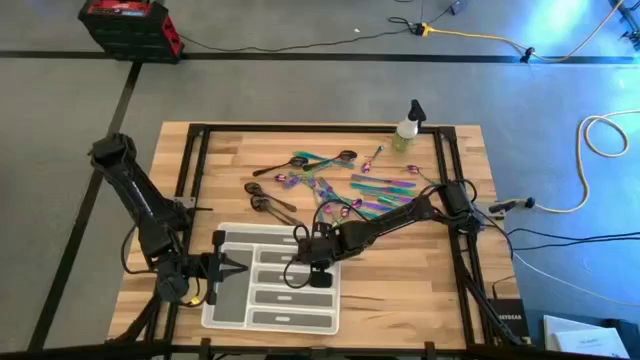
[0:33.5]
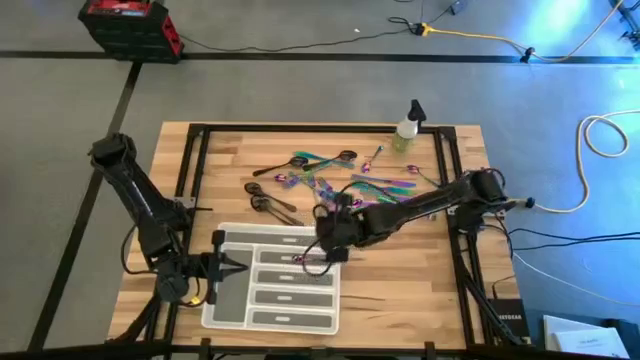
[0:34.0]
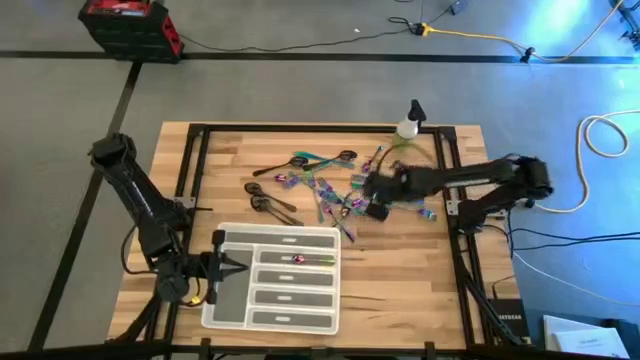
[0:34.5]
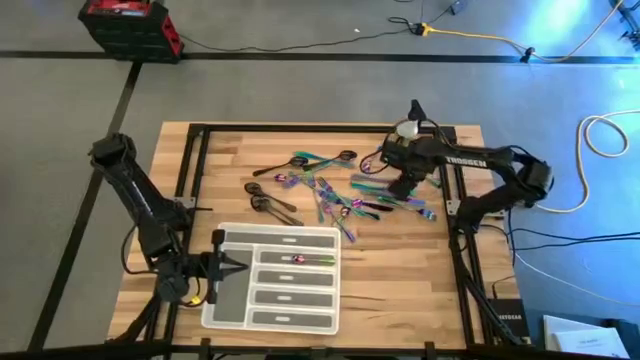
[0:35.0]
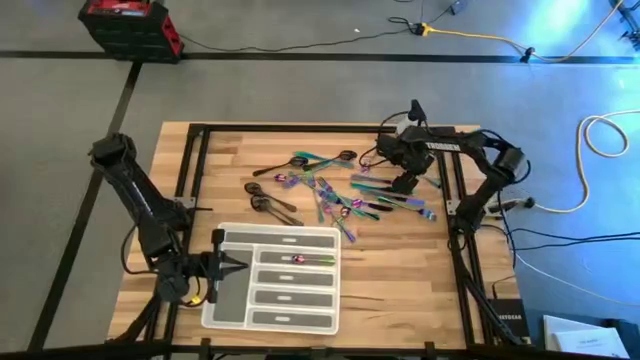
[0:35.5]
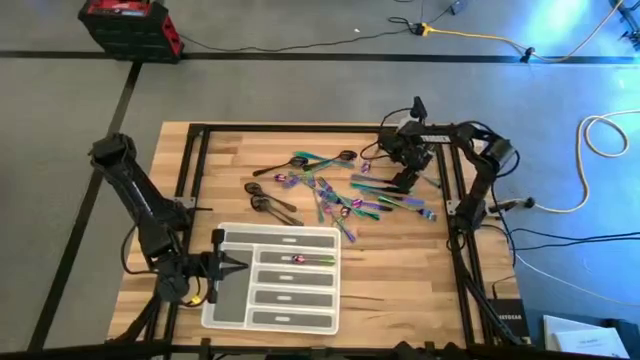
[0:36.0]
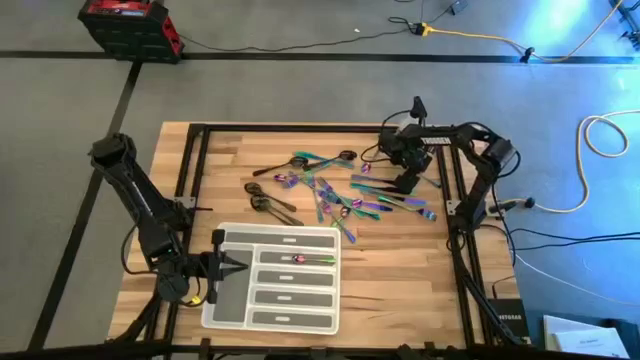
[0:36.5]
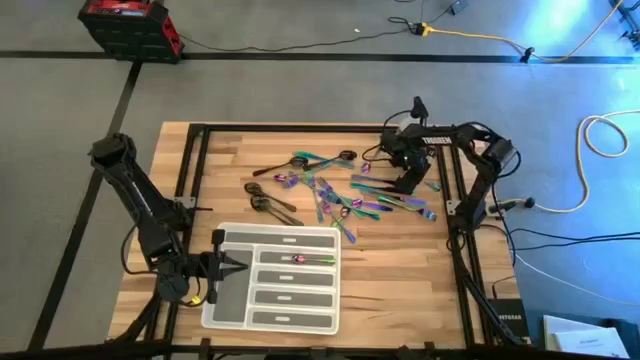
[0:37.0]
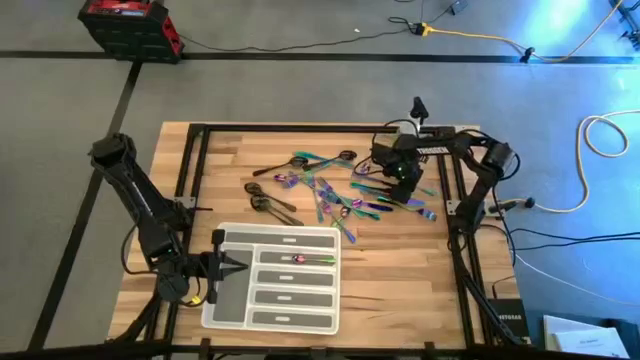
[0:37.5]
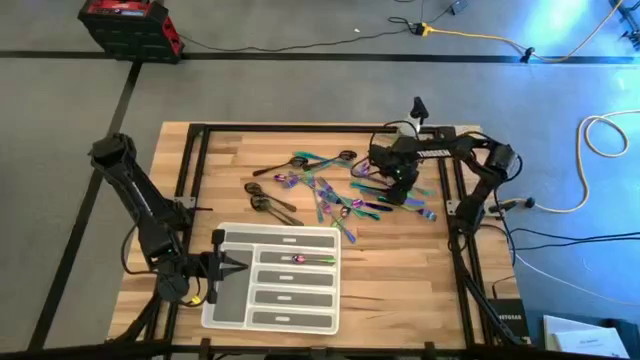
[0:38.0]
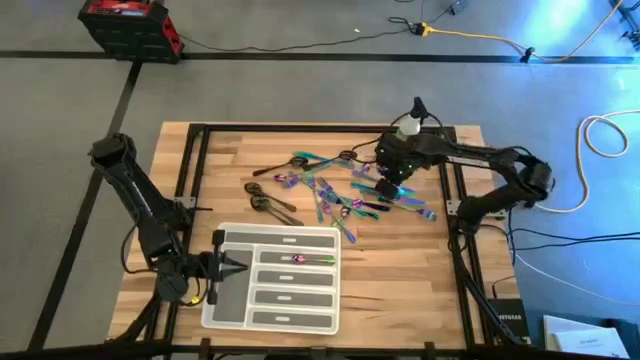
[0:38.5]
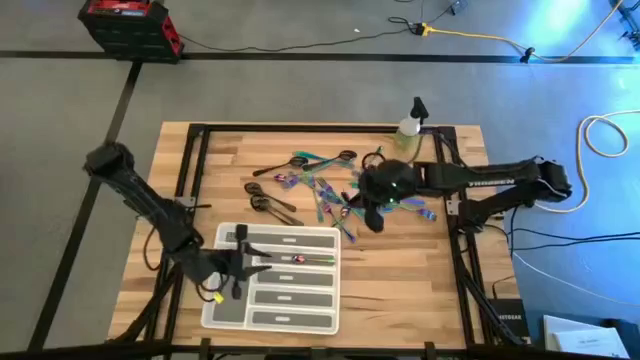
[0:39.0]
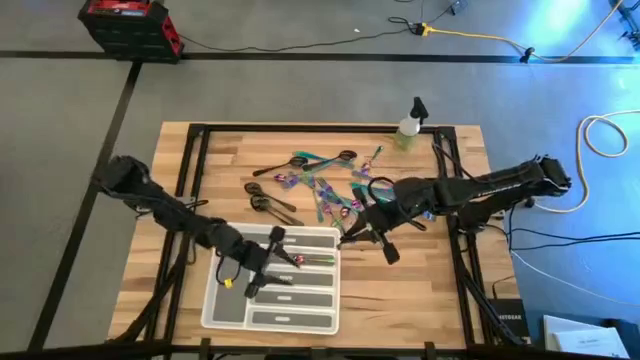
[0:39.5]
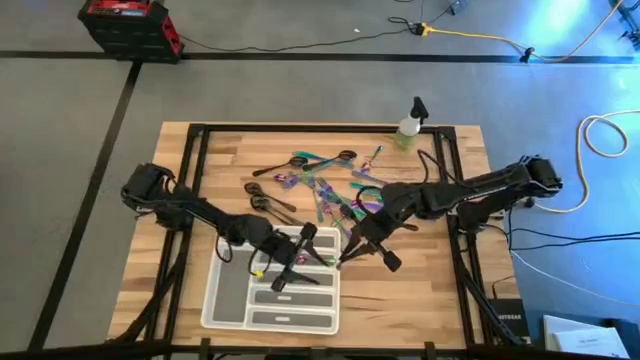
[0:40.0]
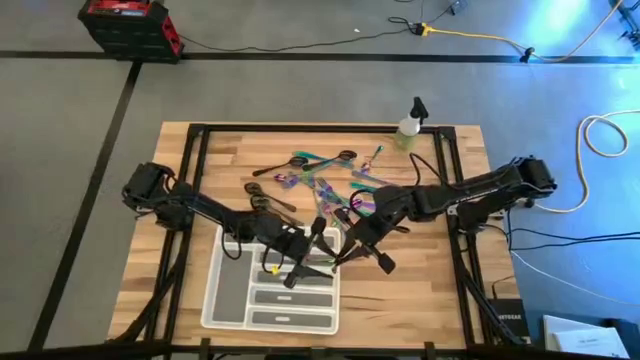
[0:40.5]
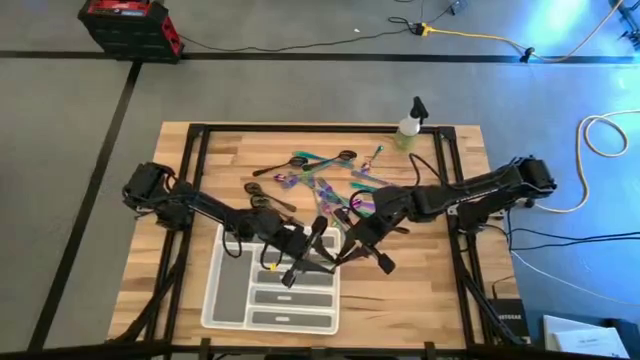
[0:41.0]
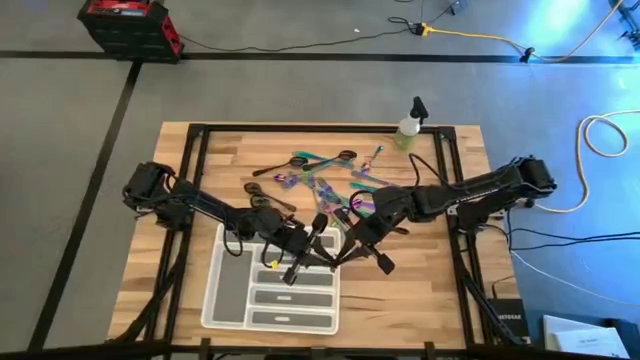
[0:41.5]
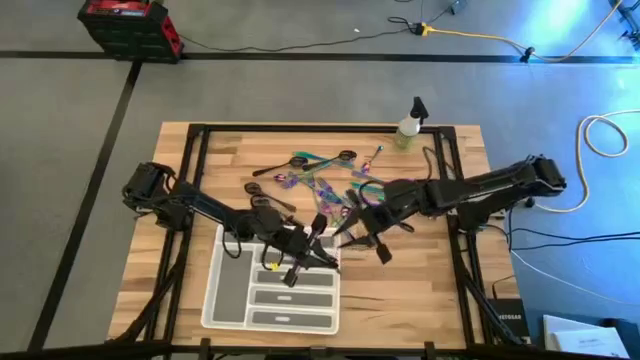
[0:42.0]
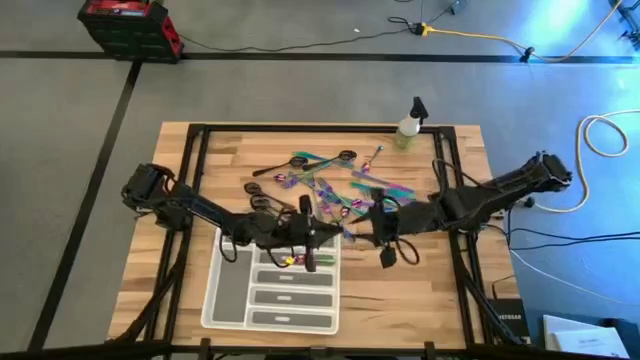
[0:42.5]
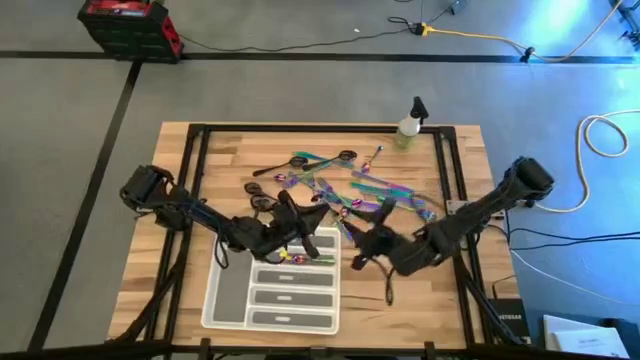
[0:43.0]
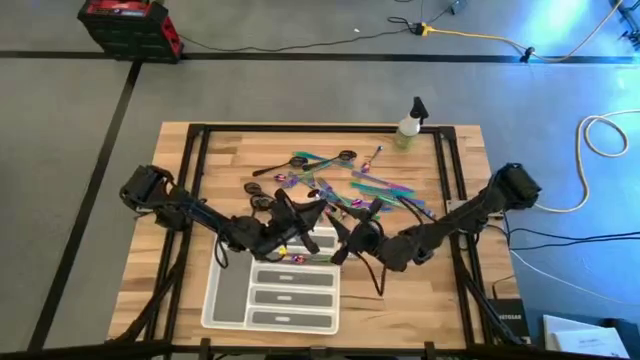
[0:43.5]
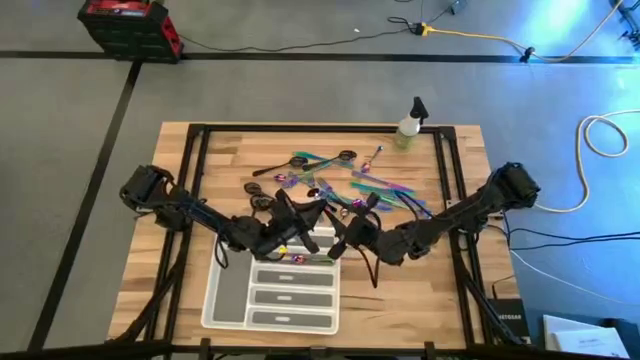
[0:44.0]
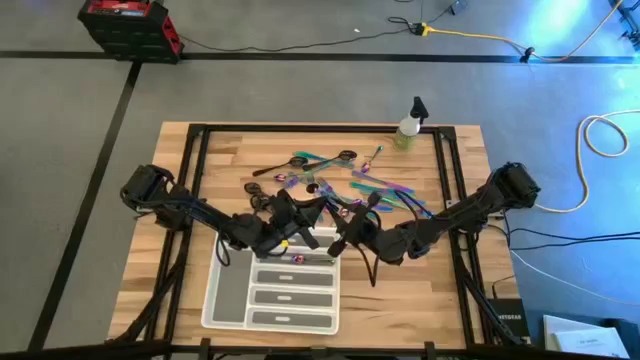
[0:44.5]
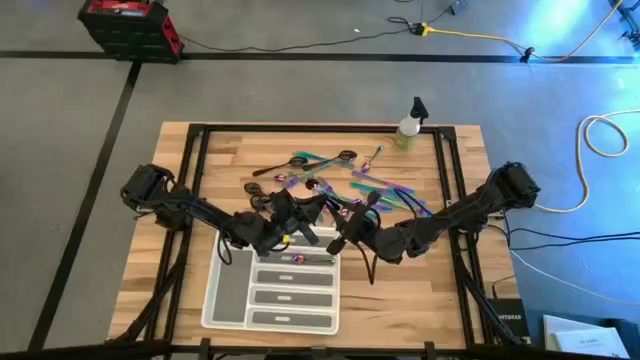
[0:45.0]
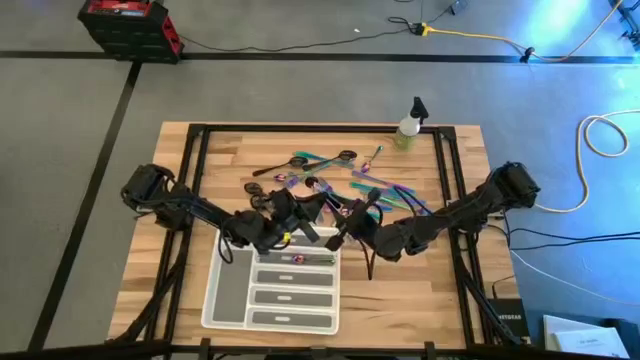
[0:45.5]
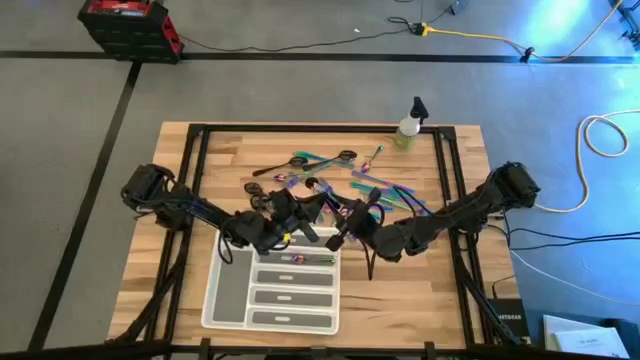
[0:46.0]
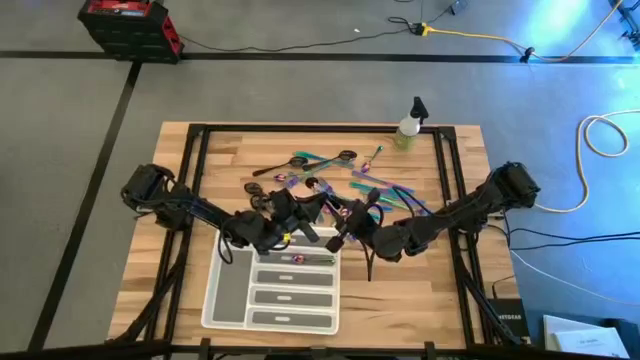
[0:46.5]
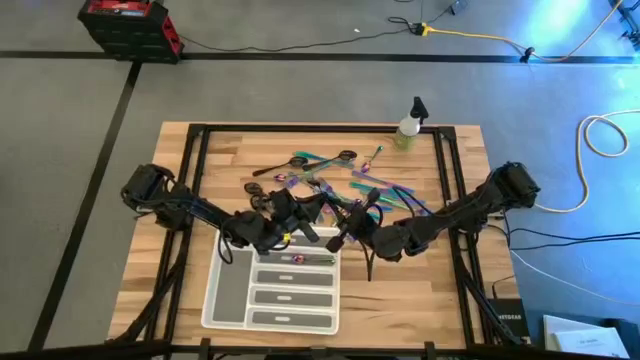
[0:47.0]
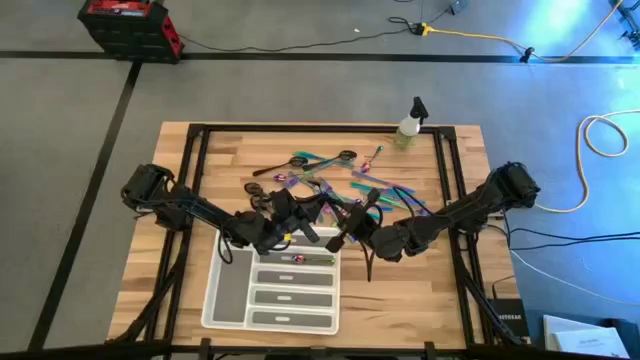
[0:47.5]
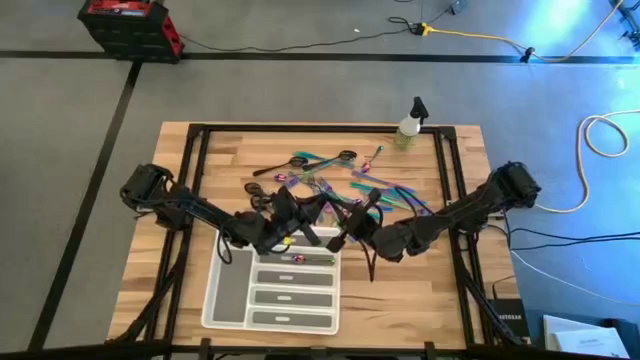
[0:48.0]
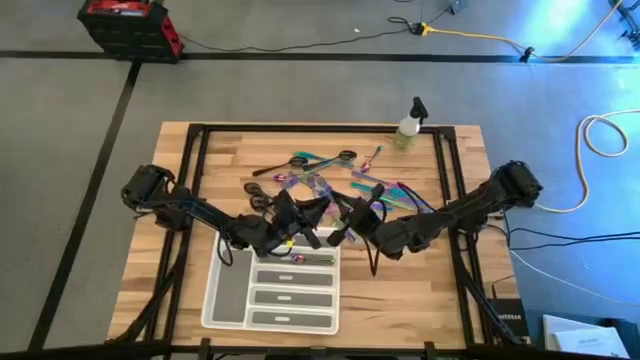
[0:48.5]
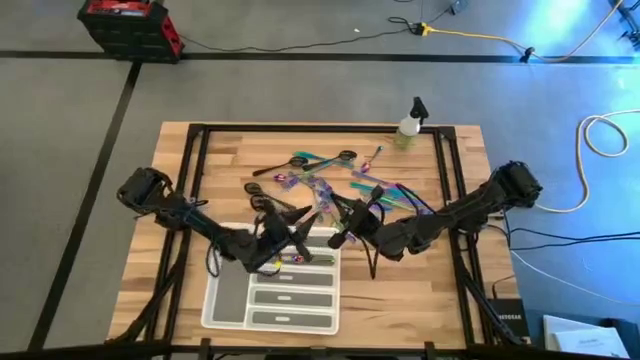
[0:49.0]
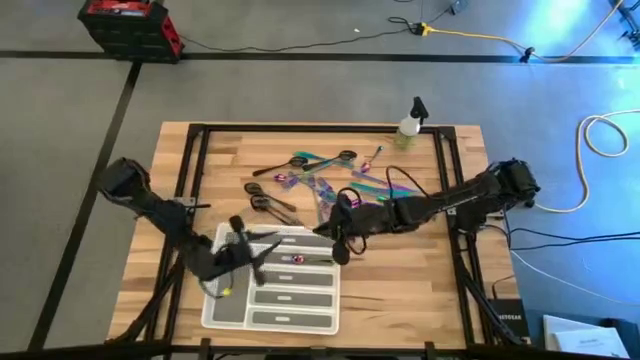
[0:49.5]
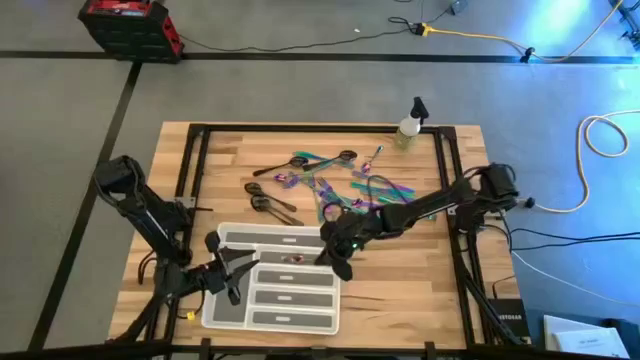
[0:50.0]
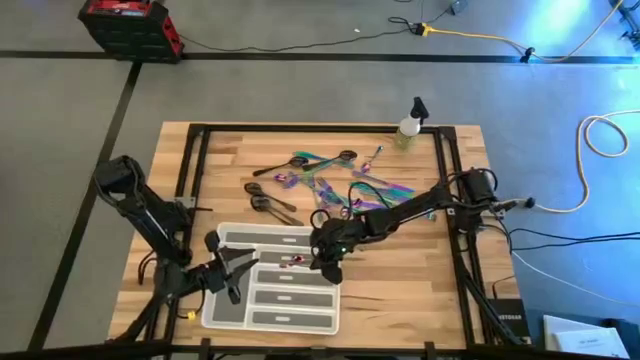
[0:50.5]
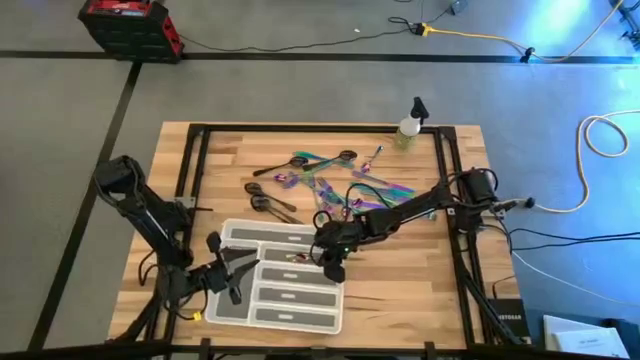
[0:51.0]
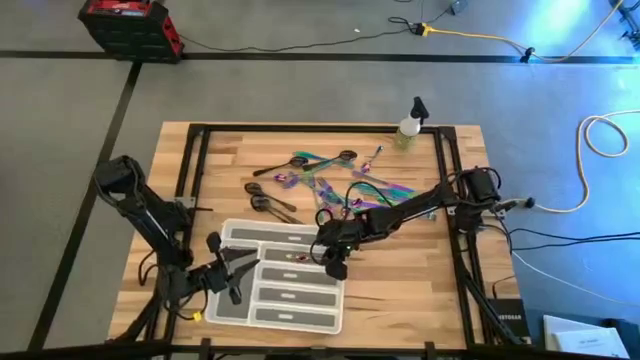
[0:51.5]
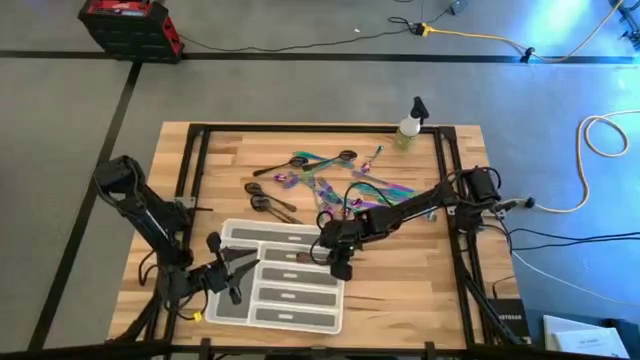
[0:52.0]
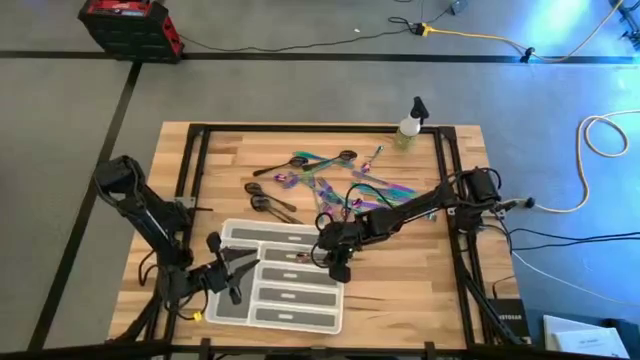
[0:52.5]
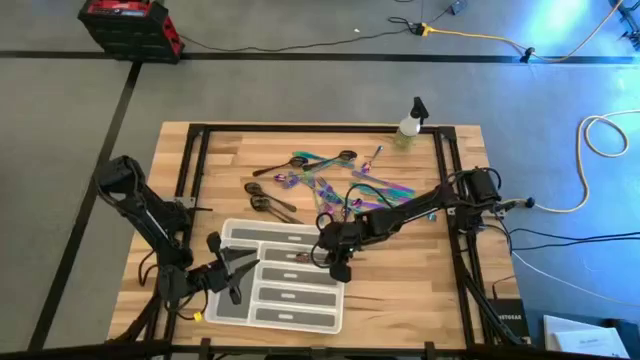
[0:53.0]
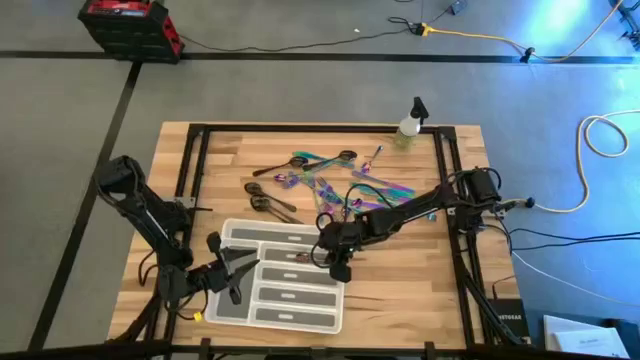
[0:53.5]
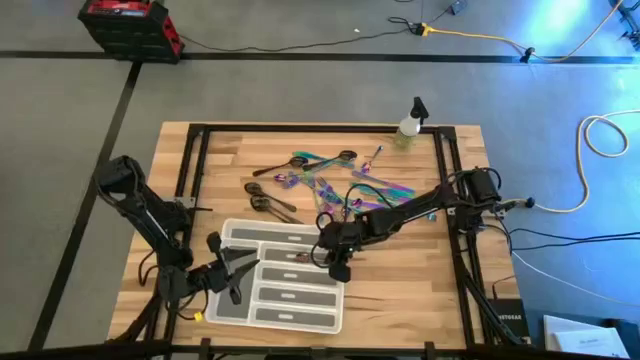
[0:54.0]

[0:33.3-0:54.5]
Task: Sort silverware
Put the blue spoon into the white silverware tray
